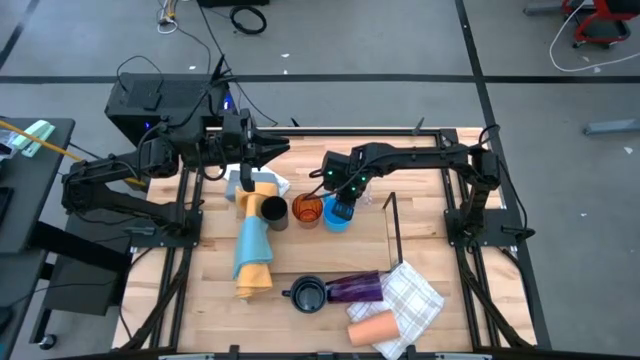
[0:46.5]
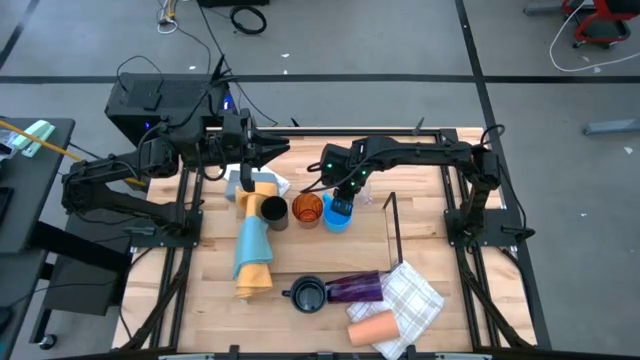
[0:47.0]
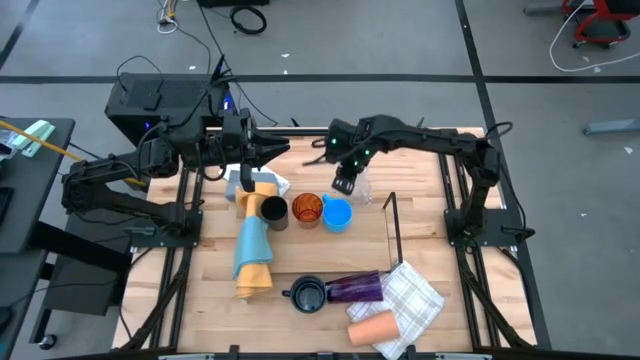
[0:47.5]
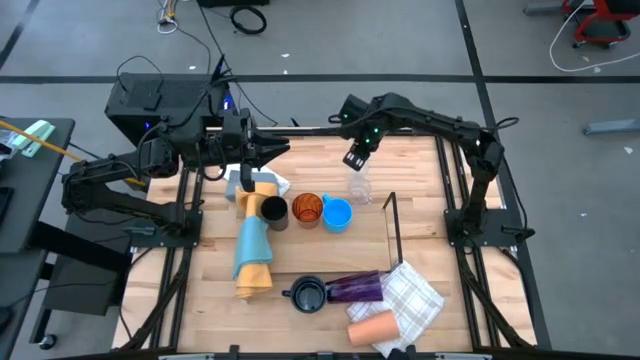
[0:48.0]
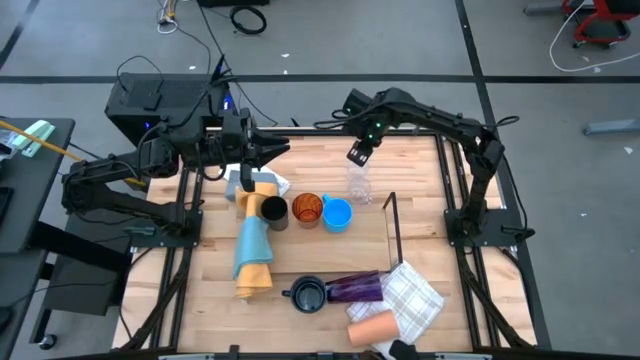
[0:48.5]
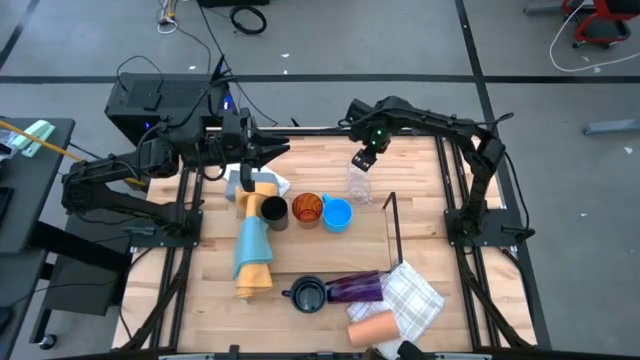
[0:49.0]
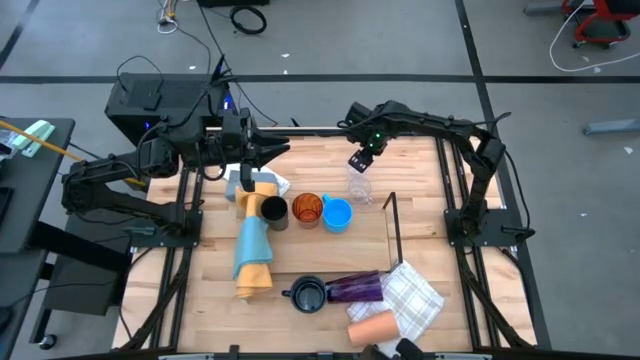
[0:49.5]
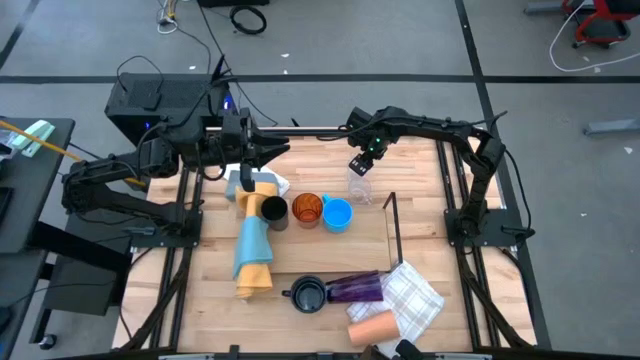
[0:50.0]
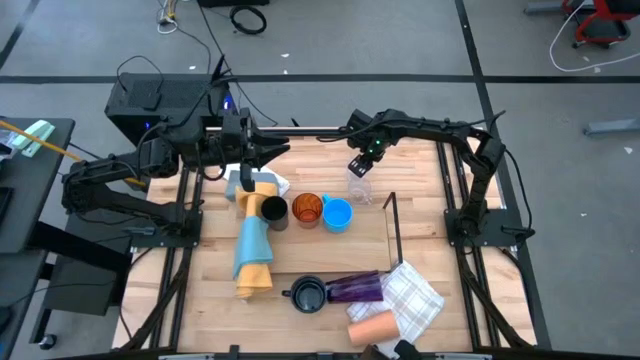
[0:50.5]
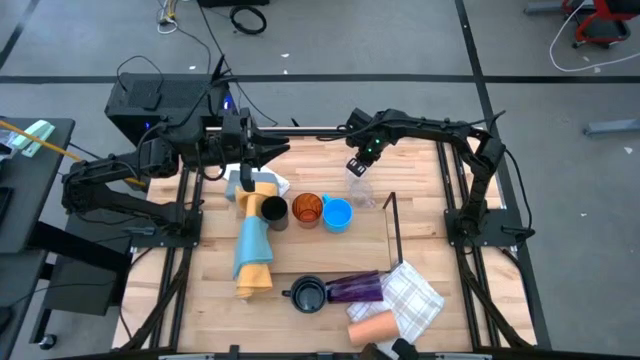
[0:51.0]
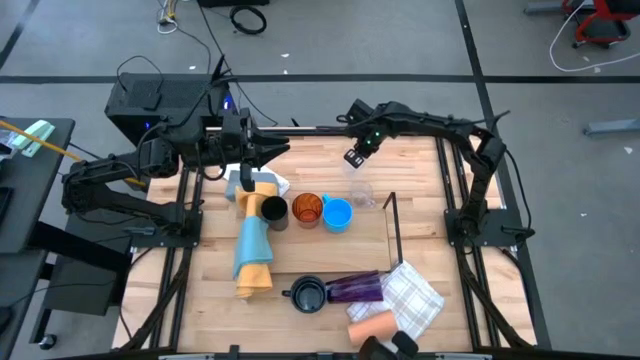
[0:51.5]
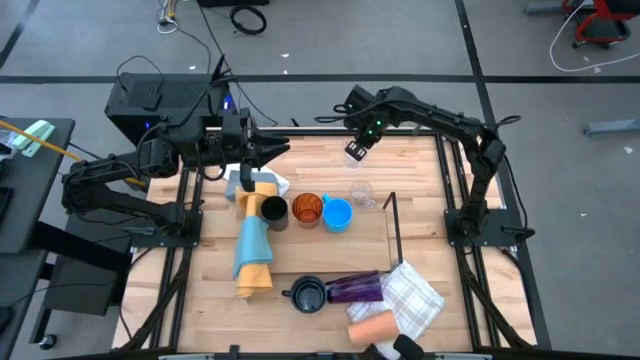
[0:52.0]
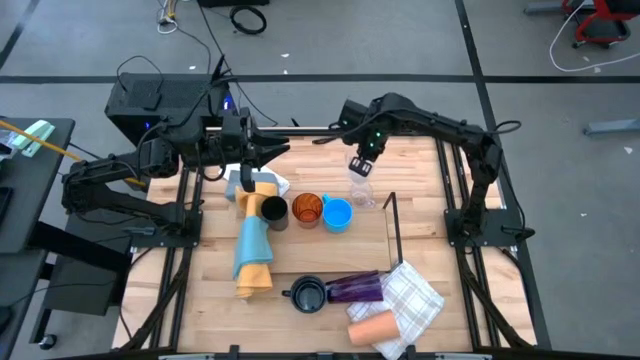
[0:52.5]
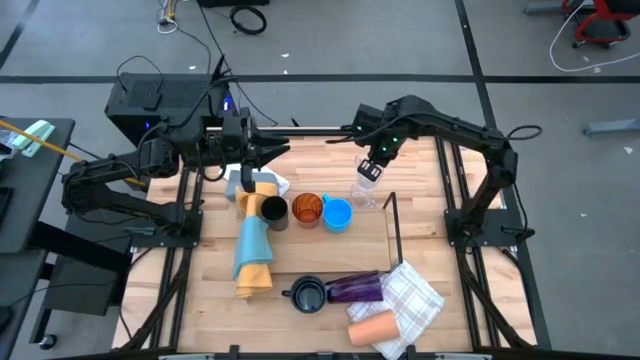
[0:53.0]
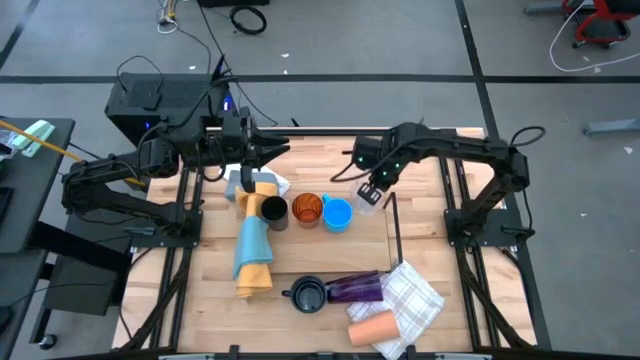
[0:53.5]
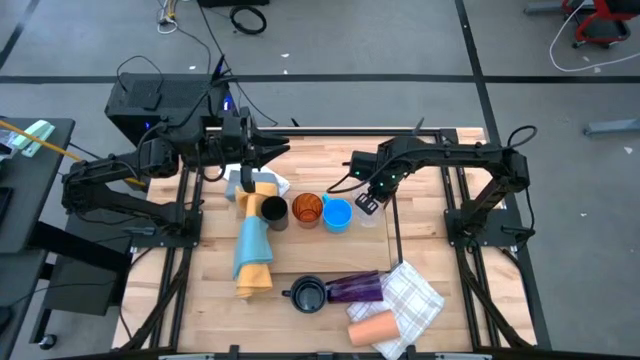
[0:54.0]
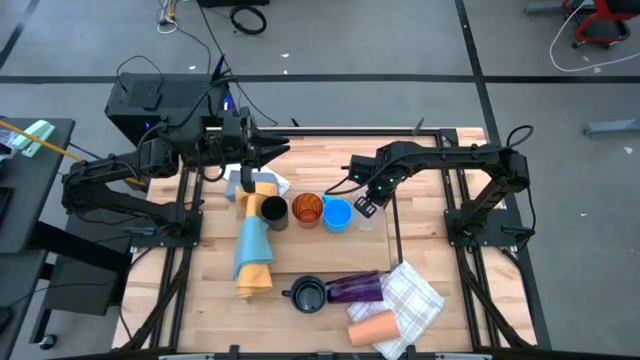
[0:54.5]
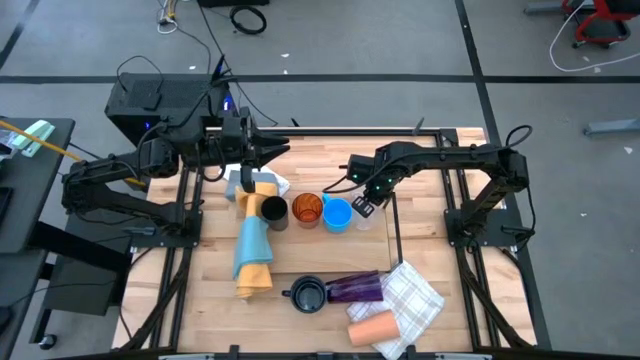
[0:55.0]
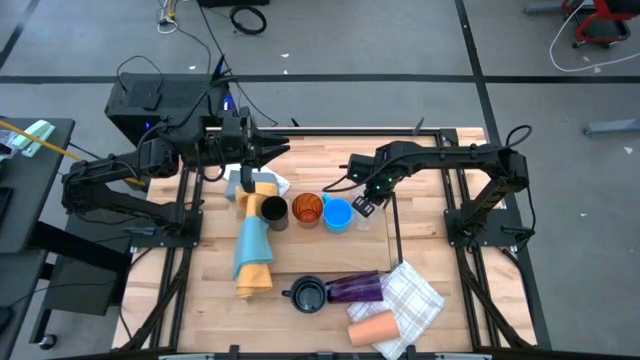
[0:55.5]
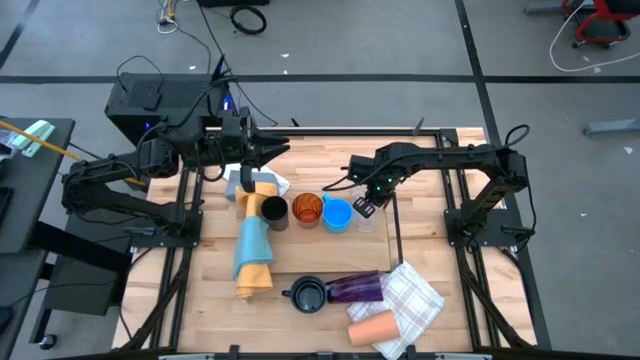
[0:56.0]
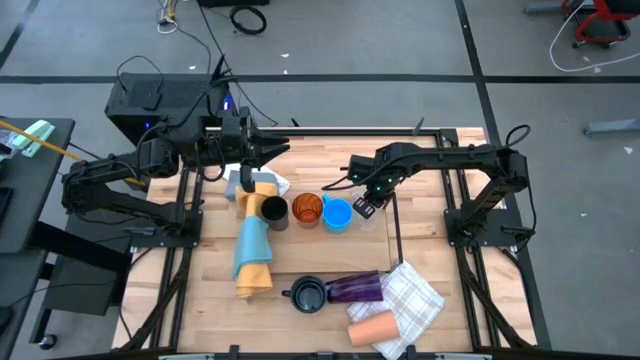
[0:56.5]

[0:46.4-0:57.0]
Task: Stack small to large cups/mugs on shelf
Put the top transparent mug on the shelf

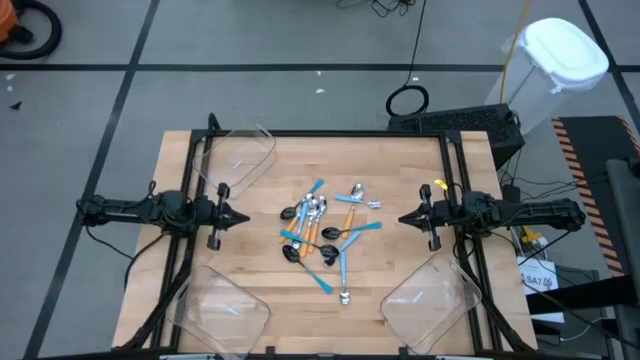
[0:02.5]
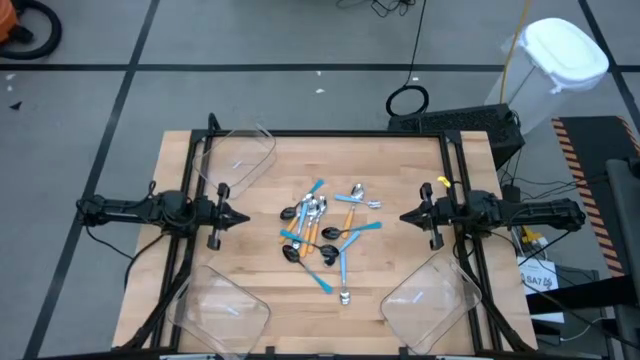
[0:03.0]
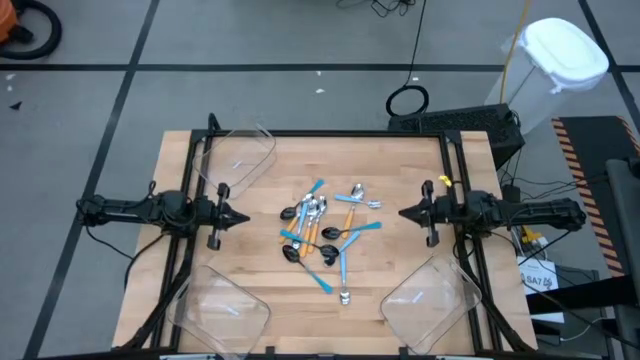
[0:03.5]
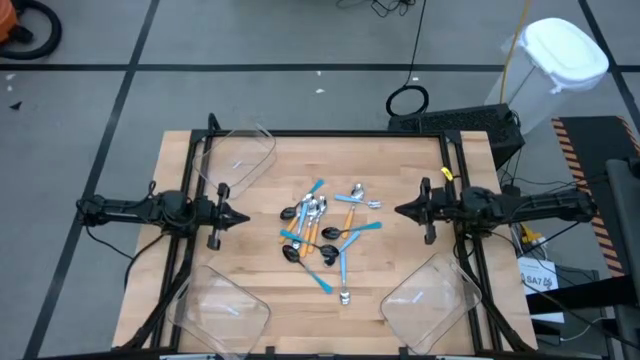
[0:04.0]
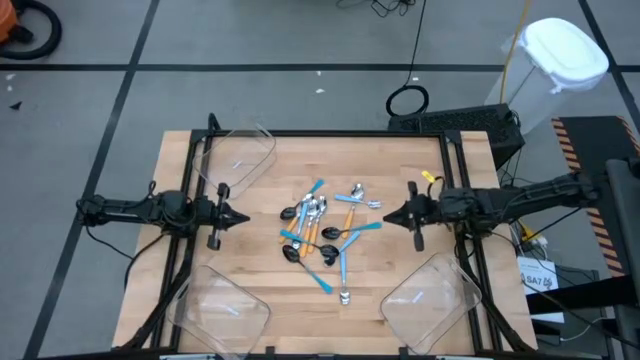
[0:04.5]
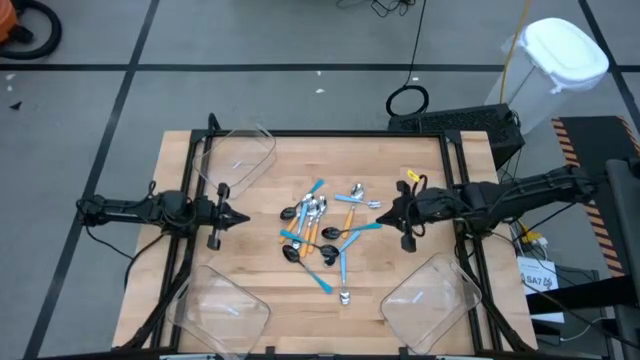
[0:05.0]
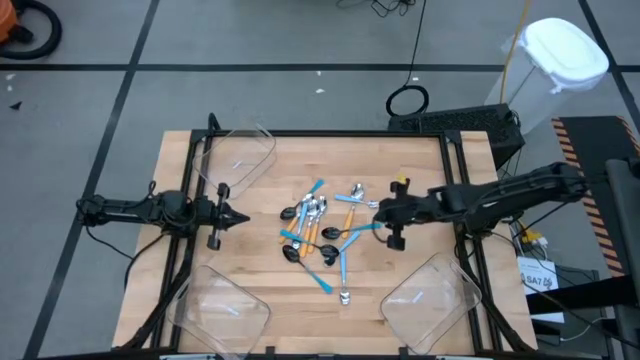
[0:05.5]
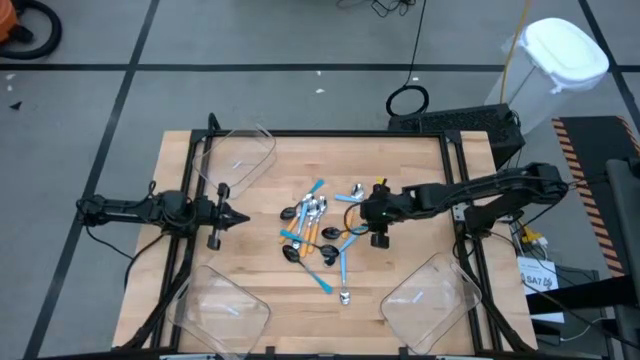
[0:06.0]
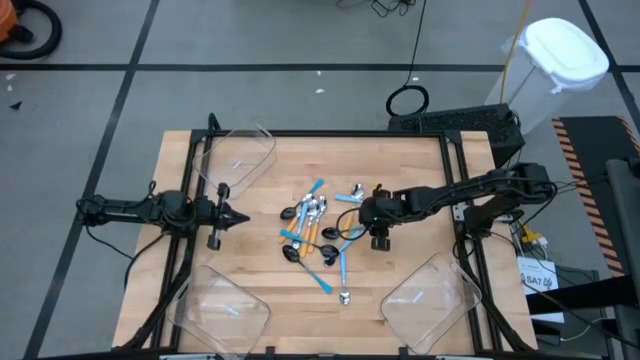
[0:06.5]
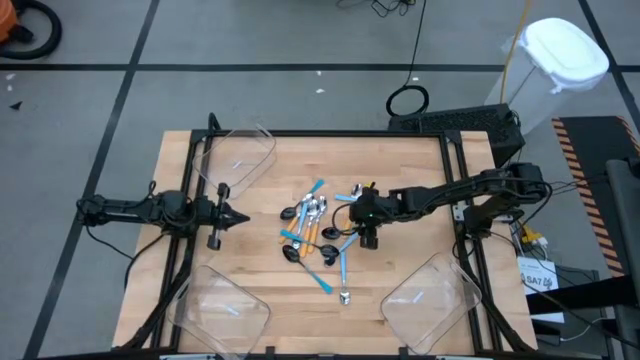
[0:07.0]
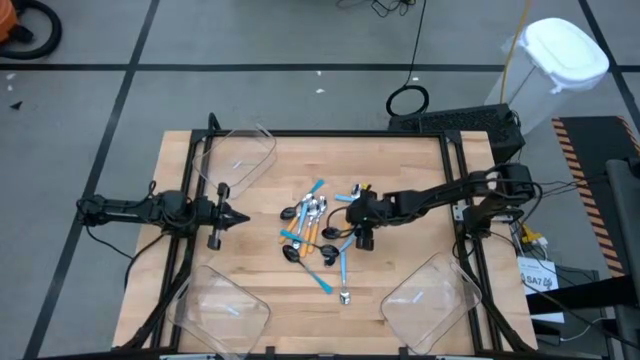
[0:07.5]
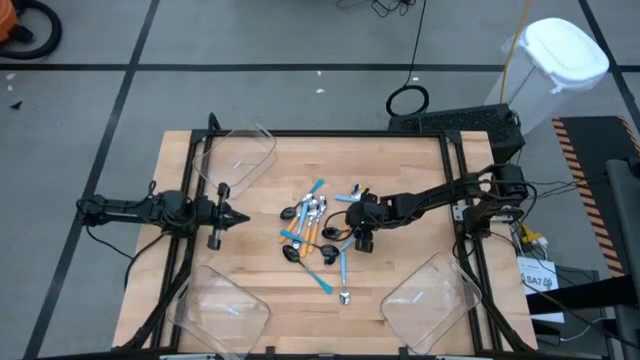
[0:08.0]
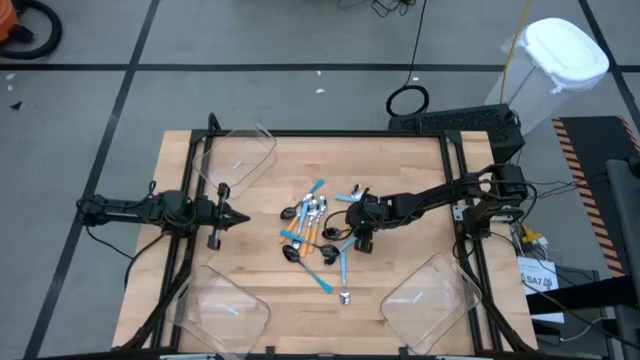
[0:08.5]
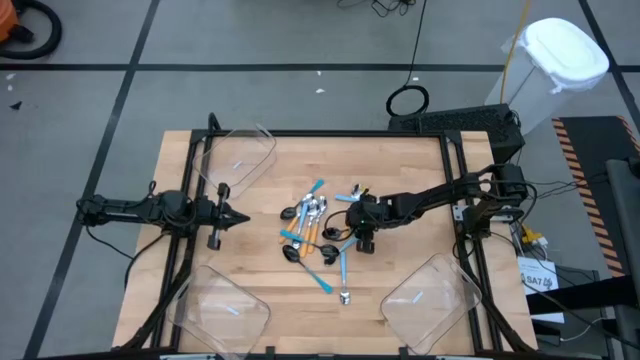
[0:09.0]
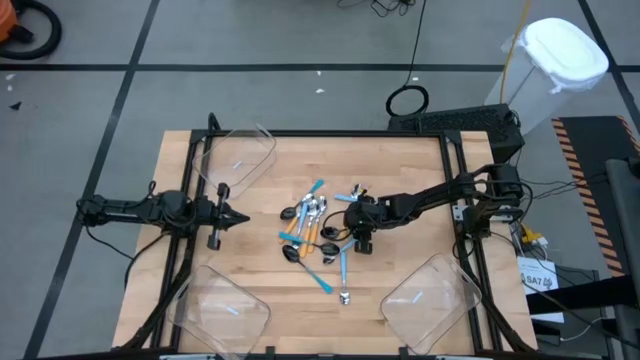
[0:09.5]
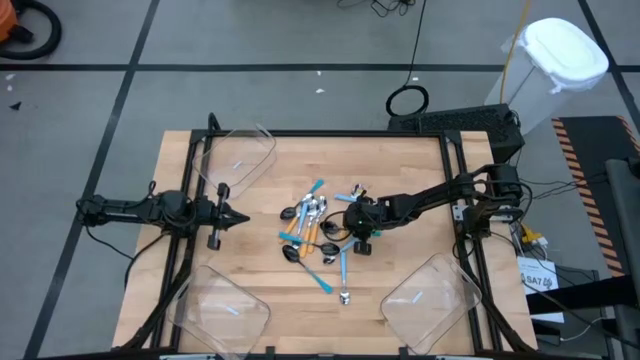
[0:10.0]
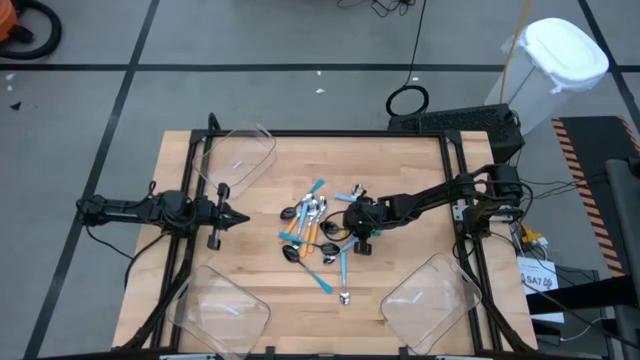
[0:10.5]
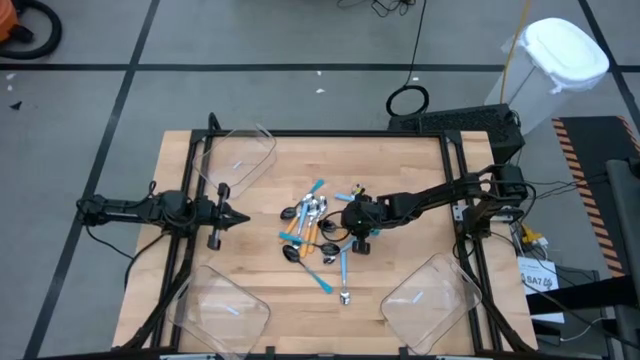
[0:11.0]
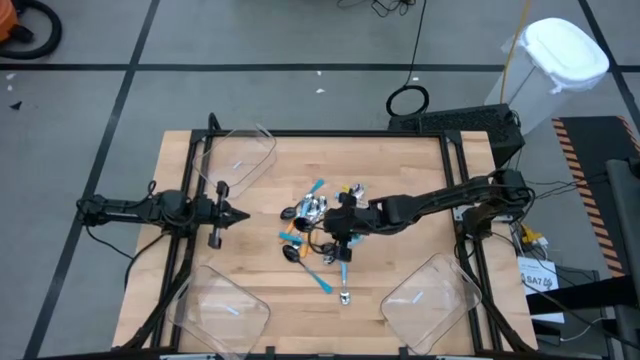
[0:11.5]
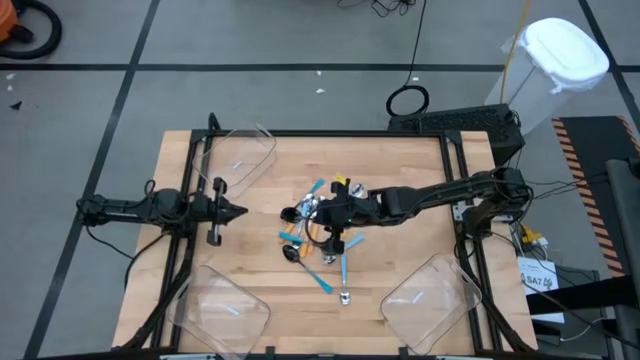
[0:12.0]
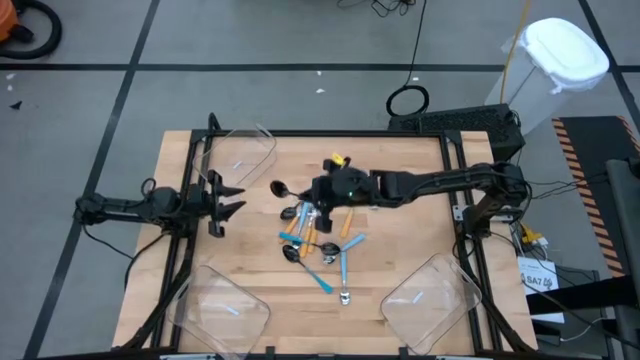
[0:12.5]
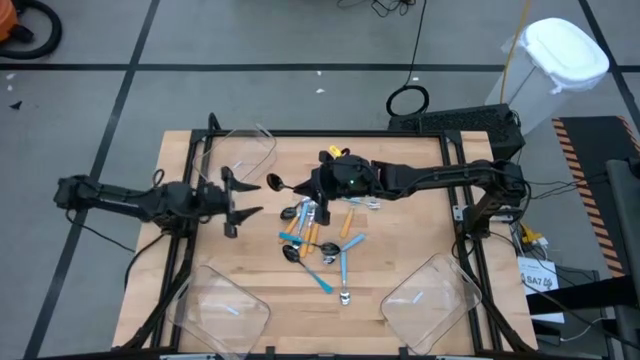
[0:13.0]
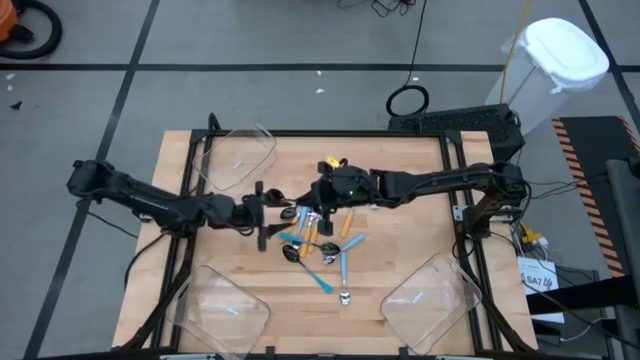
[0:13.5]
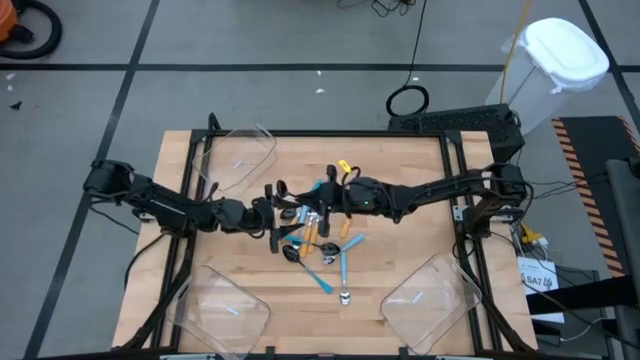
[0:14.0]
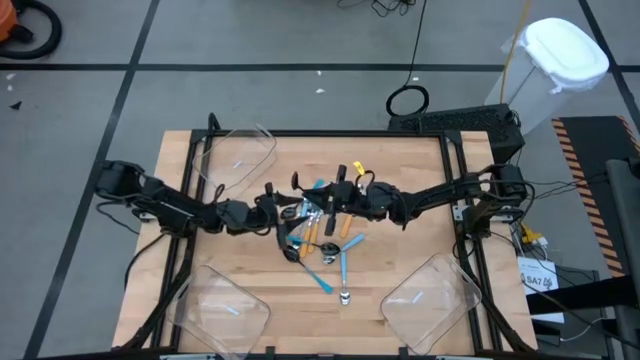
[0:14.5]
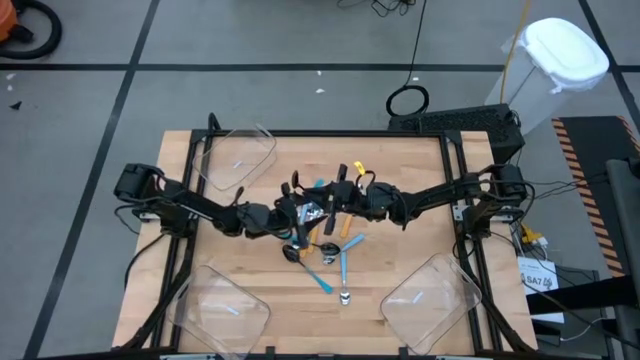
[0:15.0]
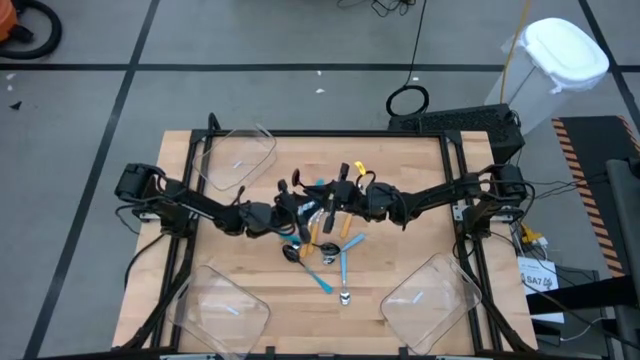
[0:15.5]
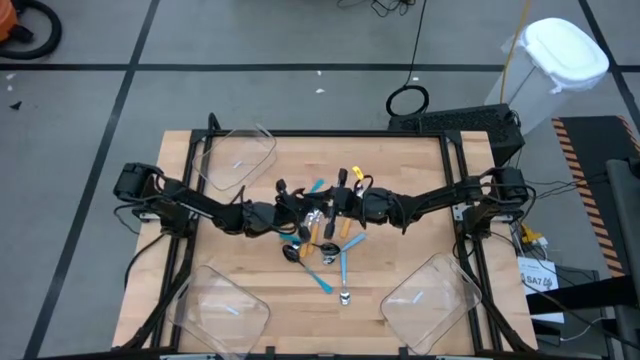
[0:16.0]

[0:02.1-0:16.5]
Task: Sort silverware by color (type)
Put the blue spoon into the top left transparent bin
